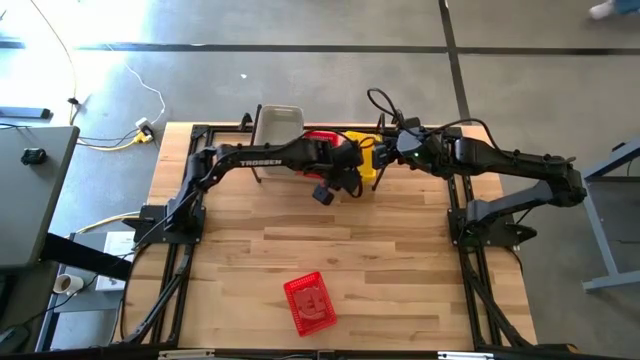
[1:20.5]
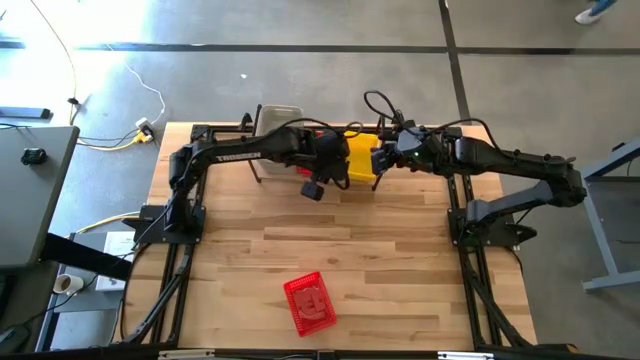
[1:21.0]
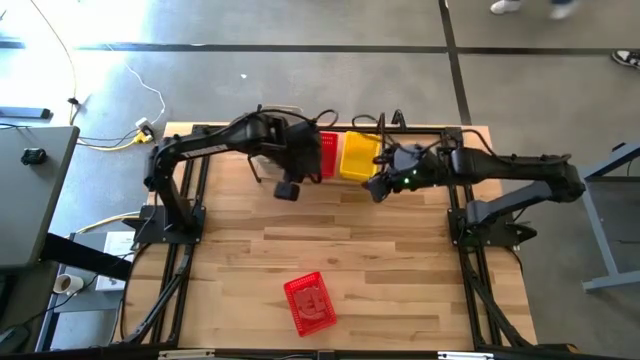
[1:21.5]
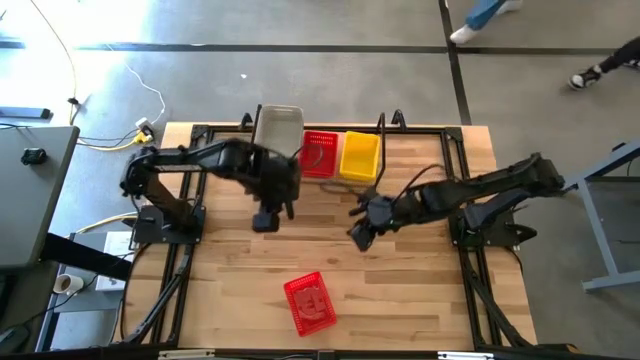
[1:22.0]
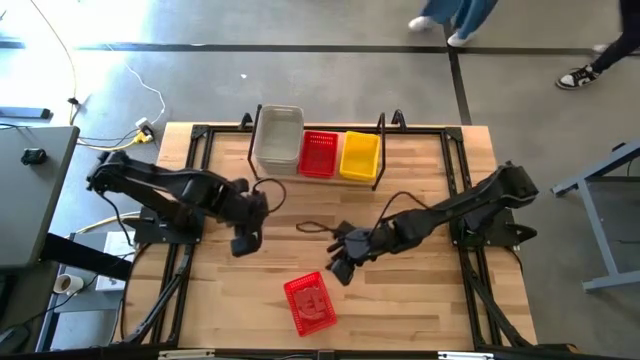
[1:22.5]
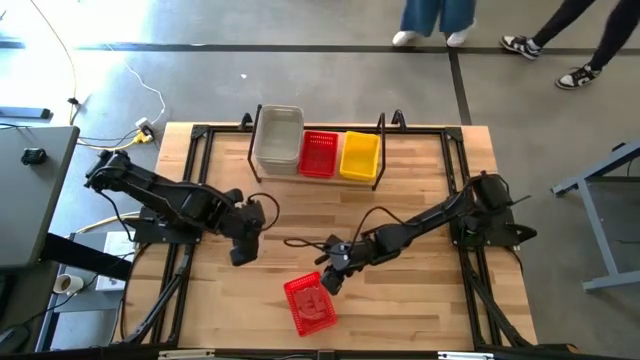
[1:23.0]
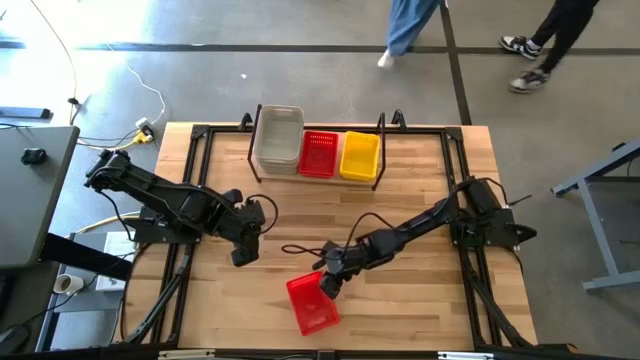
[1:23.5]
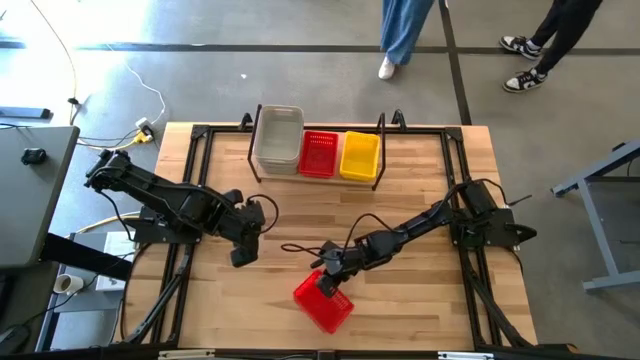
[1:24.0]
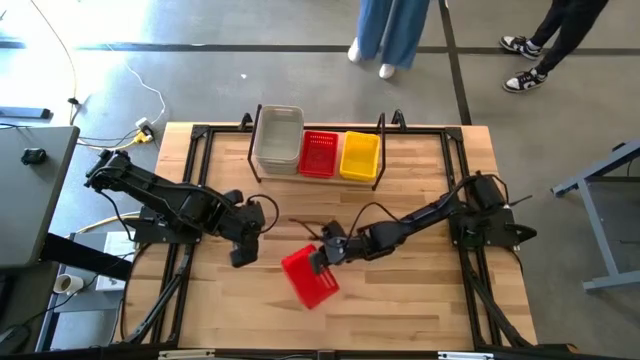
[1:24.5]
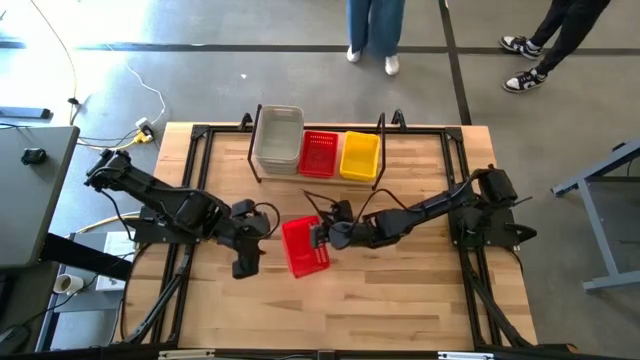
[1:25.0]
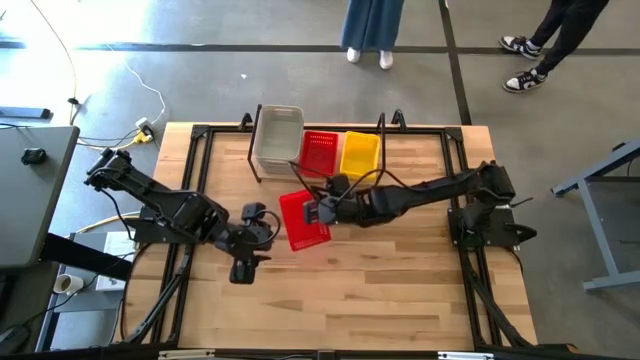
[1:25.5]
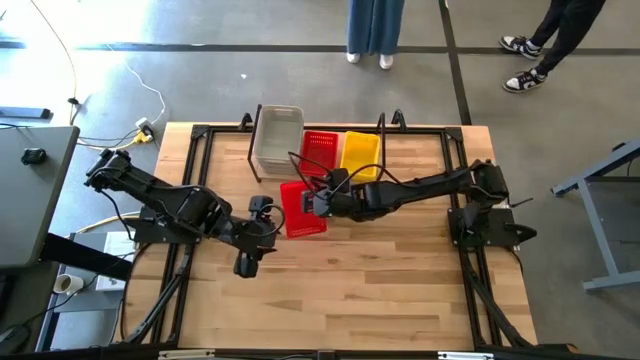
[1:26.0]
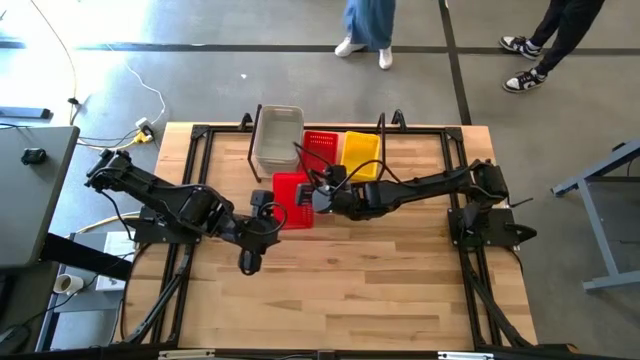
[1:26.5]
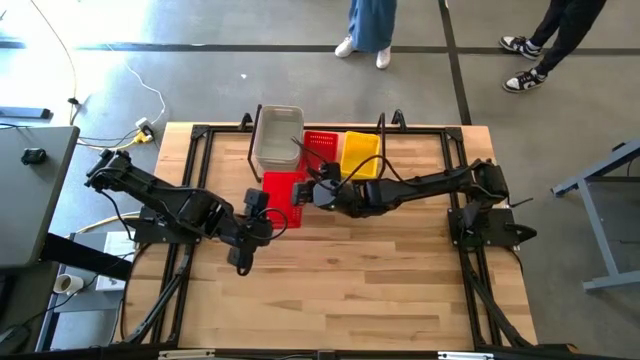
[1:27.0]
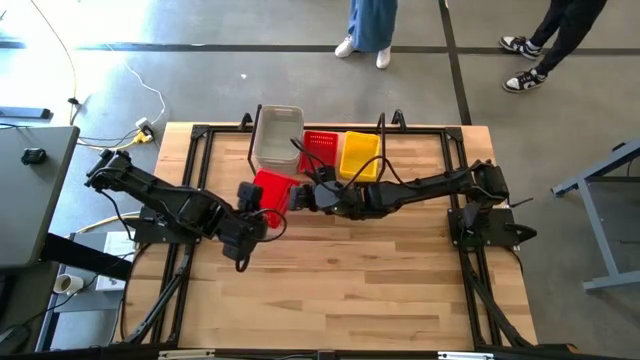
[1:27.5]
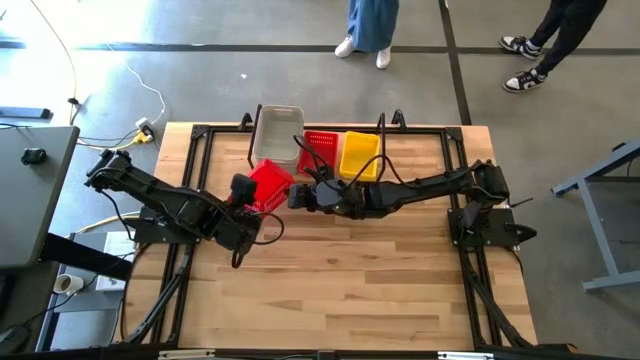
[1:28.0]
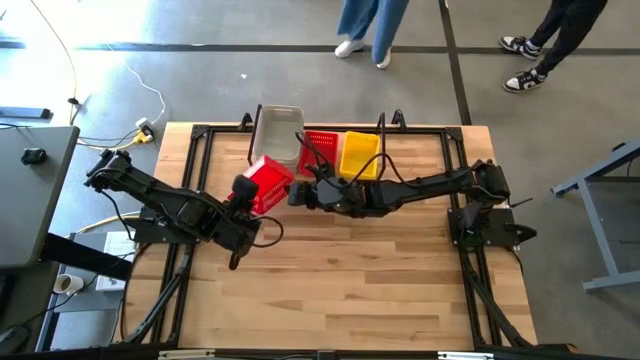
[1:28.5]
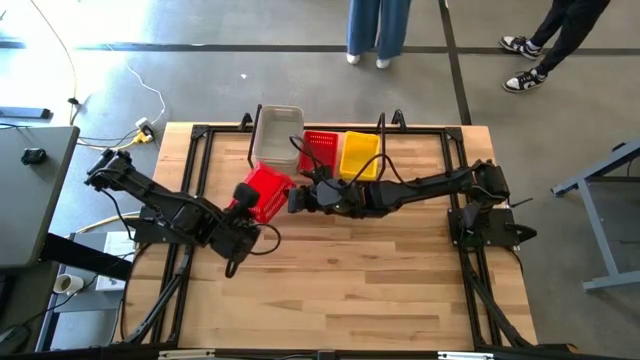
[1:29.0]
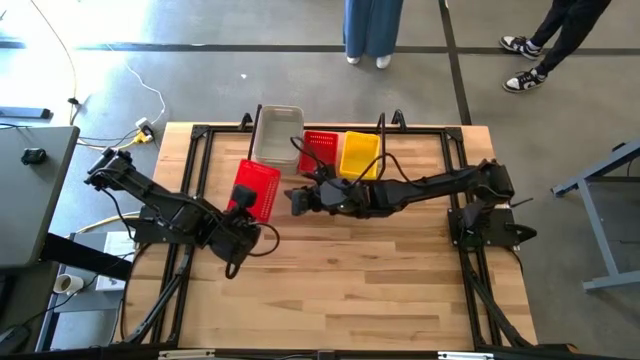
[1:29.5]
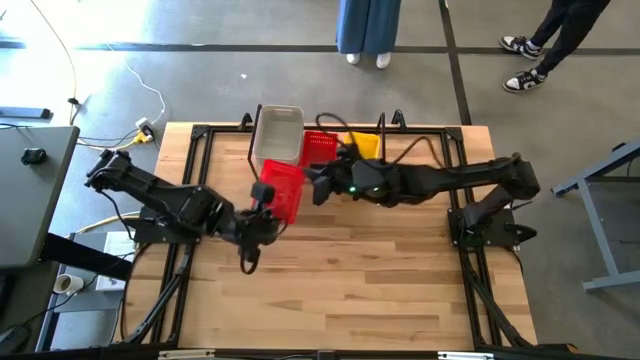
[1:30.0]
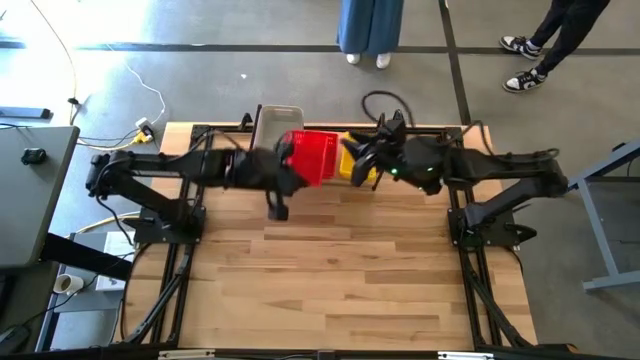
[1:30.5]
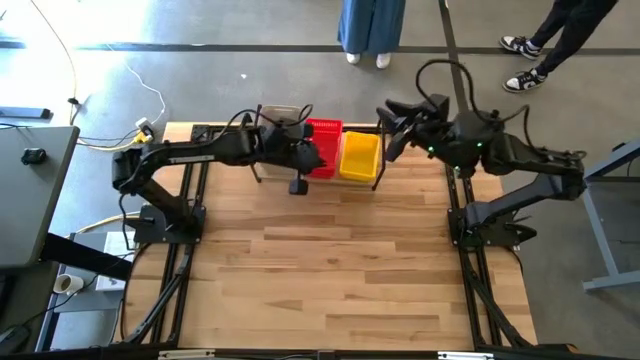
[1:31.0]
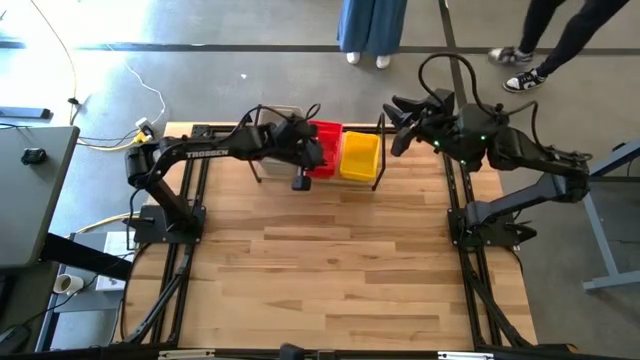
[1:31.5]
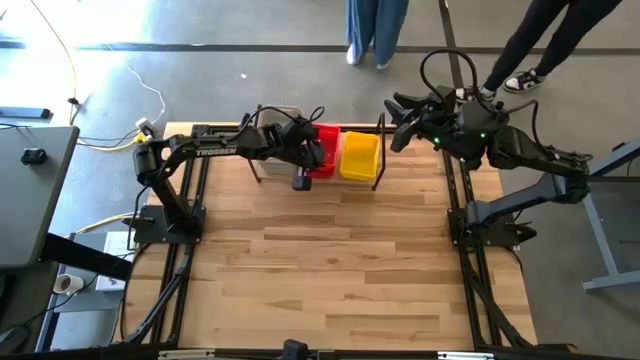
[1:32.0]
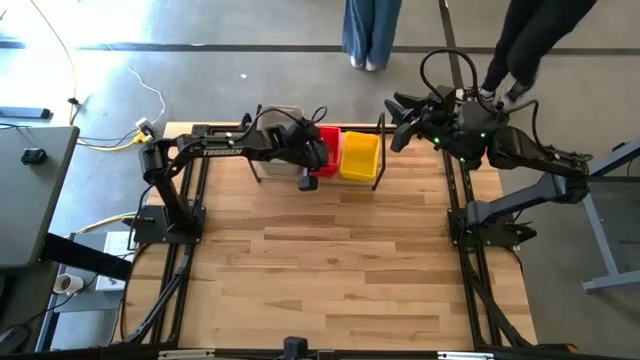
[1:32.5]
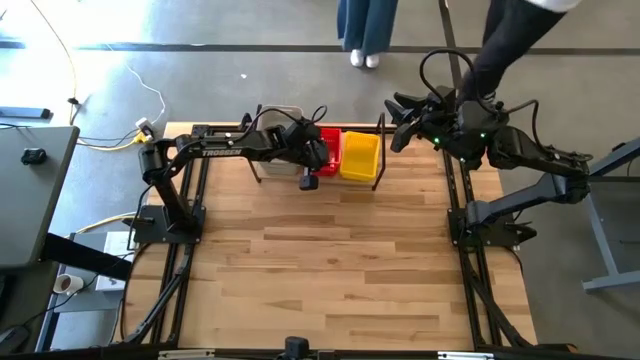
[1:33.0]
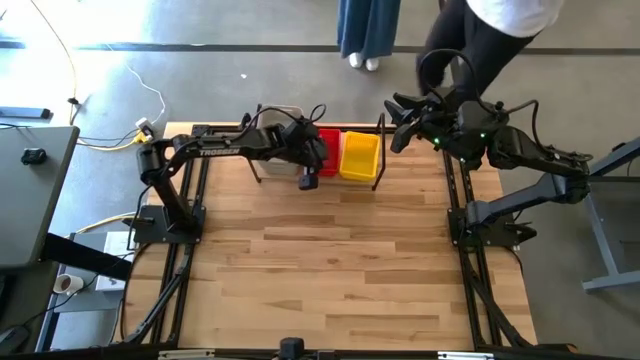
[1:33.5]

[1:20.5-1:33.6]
Task: Stack baskets on shelf by color
Stack the red bin on top of the red bin

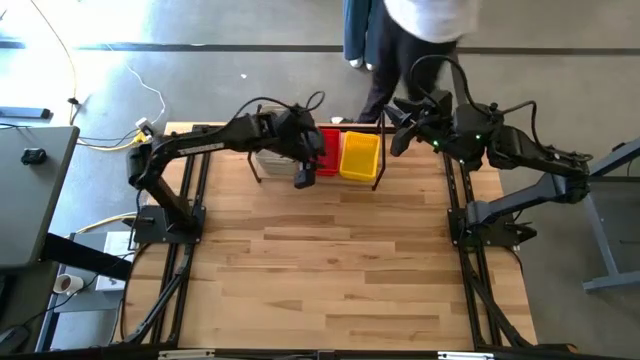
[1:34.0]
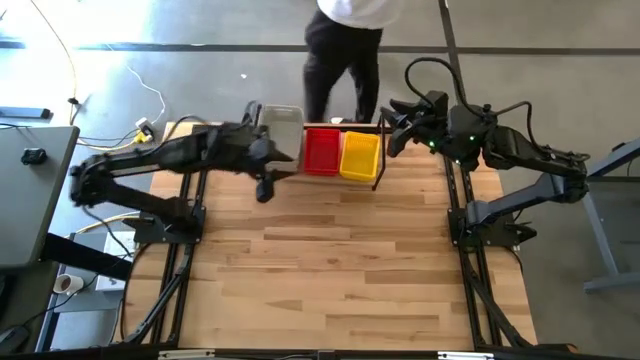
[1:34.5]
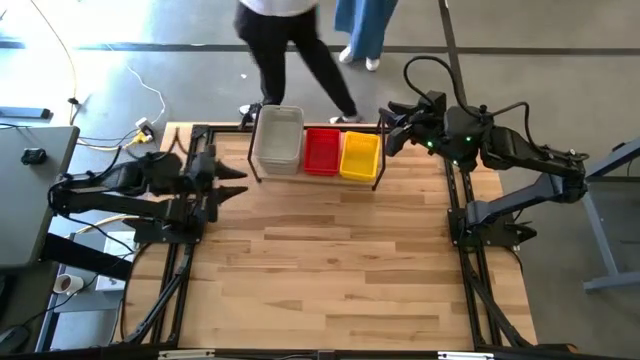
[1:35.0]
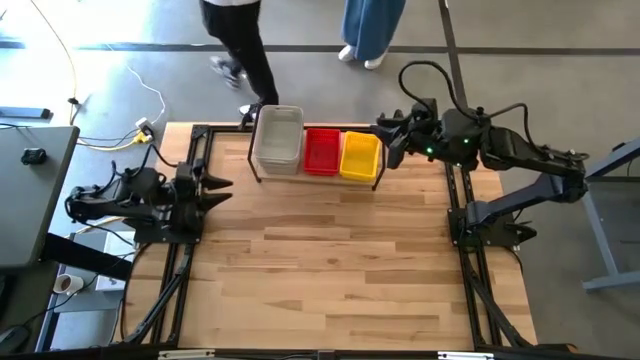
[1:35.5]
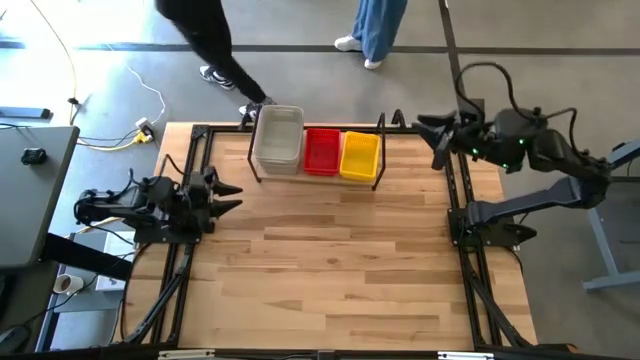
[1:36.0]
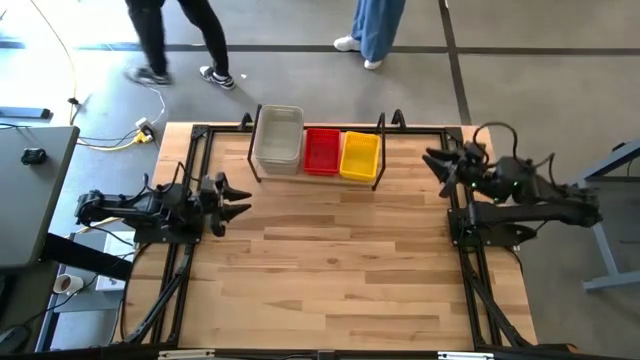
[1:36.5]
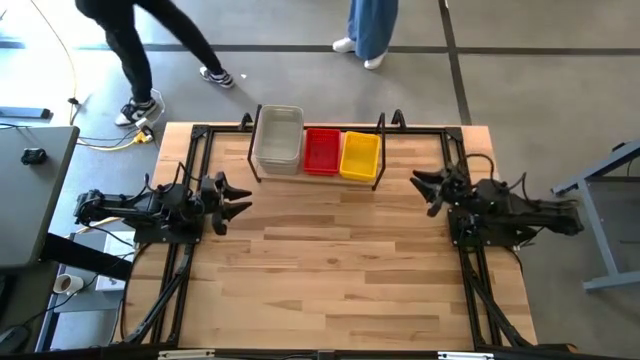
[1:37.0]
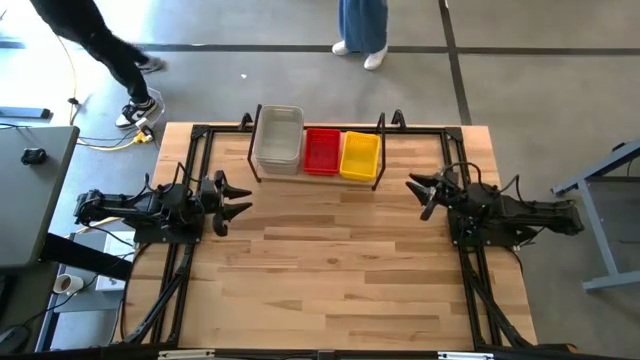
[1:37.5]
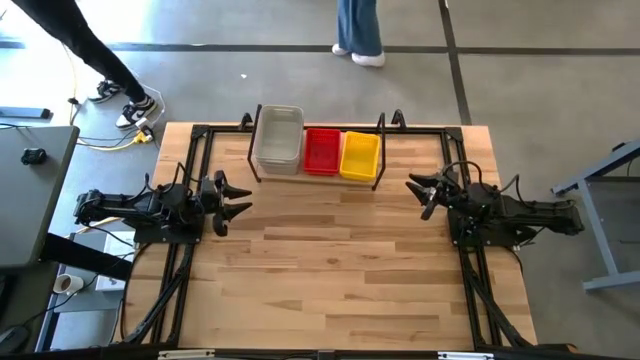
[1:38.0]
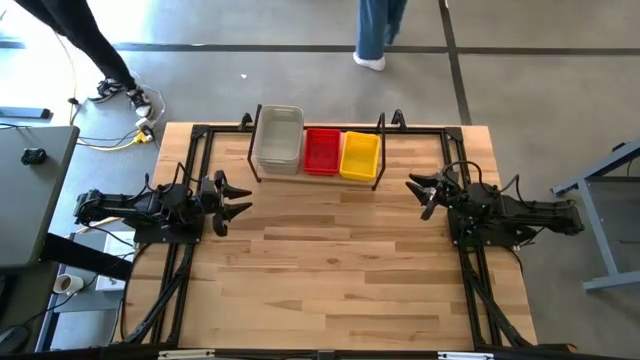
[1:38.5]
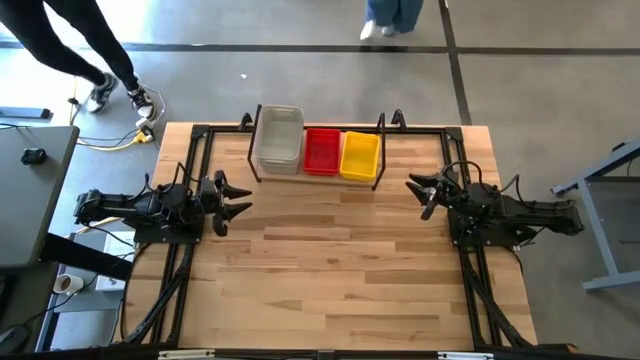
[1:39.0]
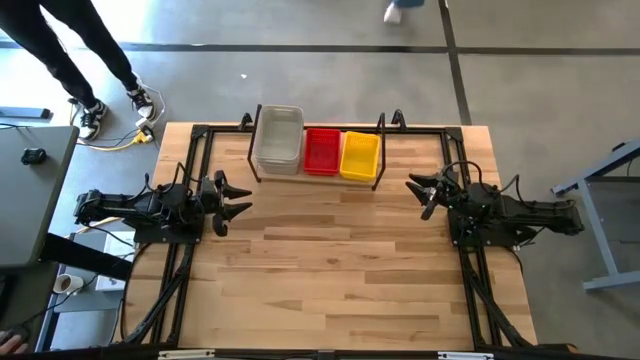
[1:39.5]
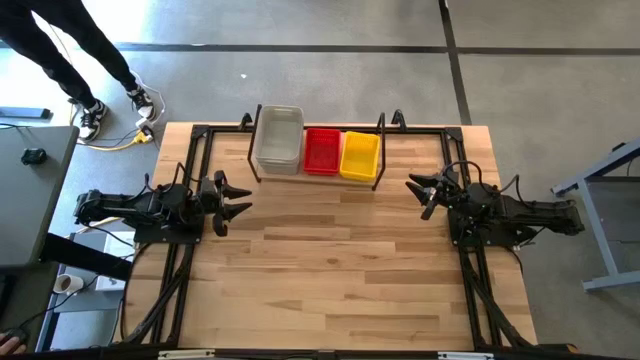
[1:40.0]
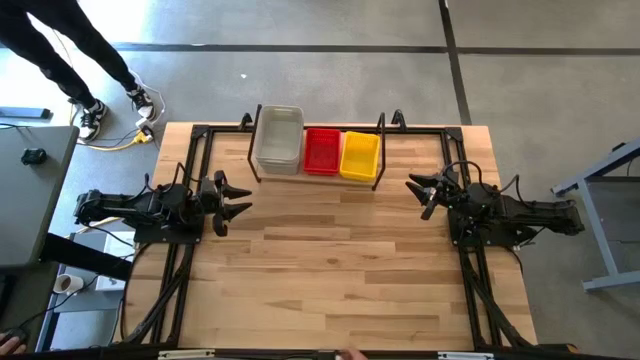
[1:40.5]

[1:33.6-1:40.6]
Return to Home Position
